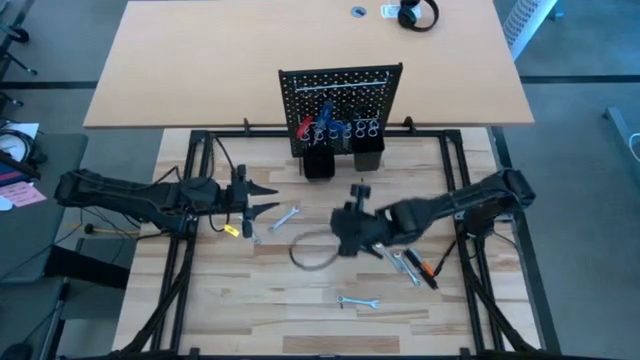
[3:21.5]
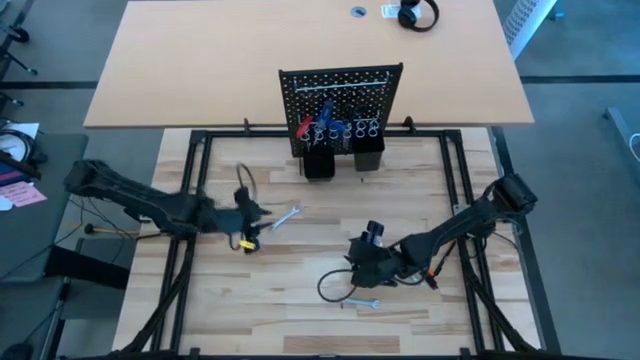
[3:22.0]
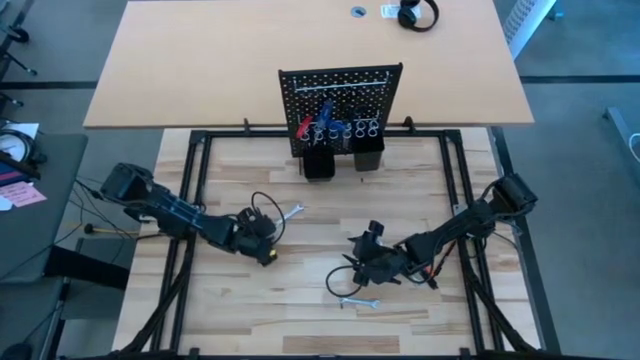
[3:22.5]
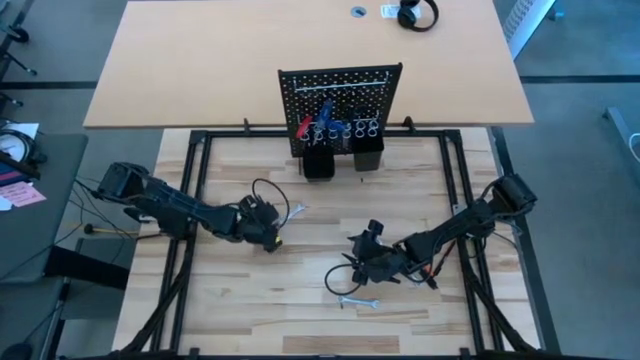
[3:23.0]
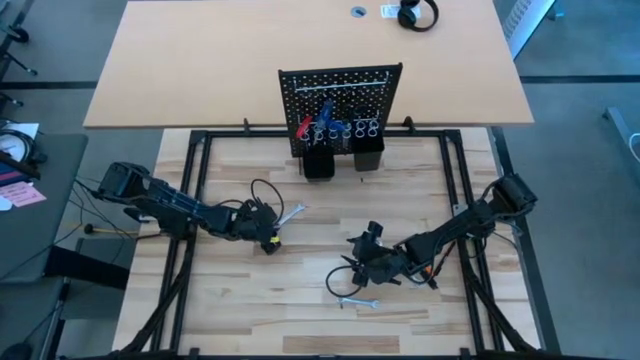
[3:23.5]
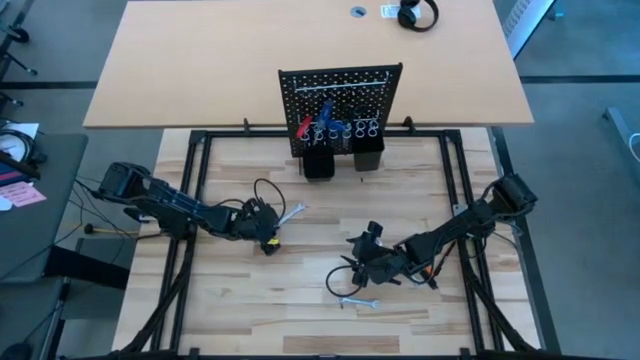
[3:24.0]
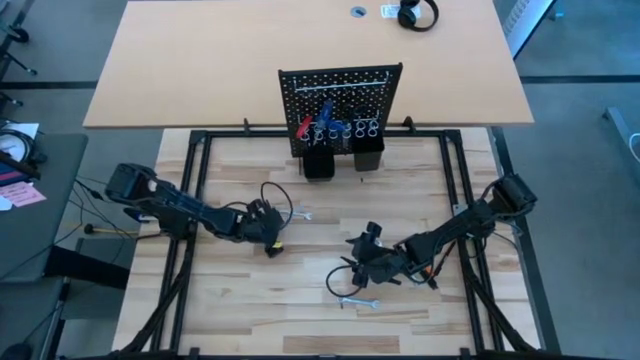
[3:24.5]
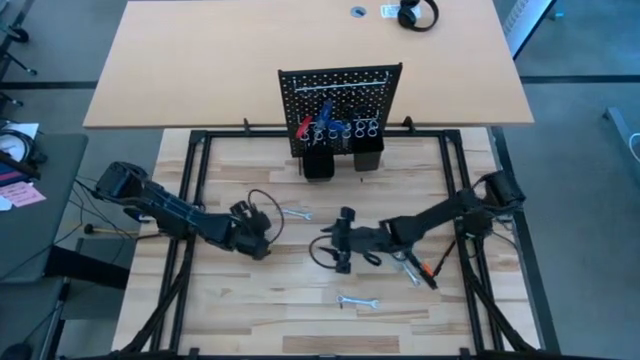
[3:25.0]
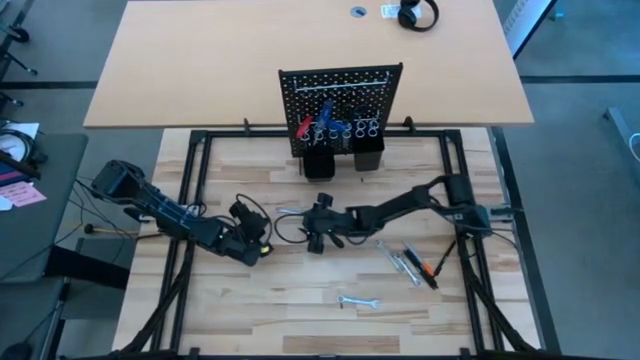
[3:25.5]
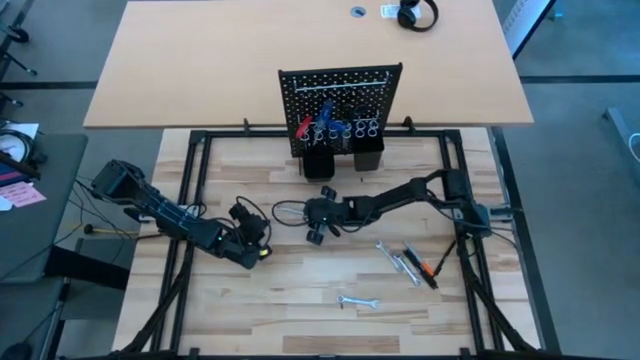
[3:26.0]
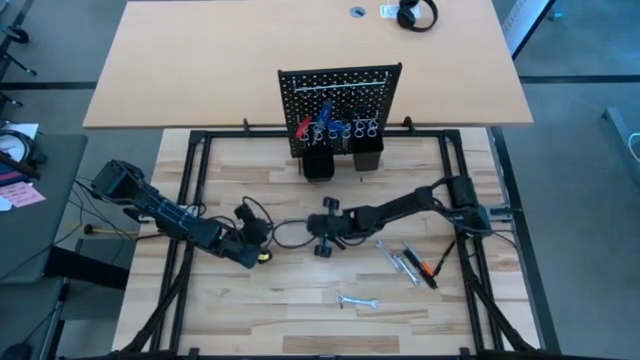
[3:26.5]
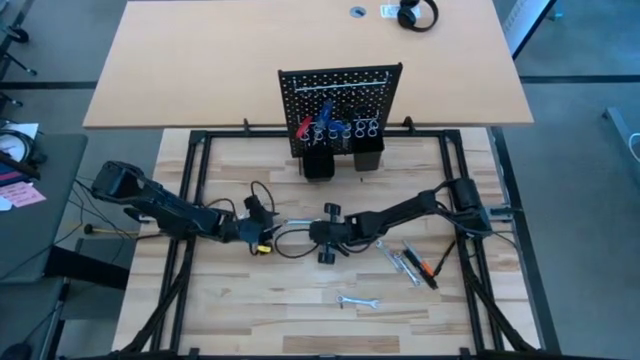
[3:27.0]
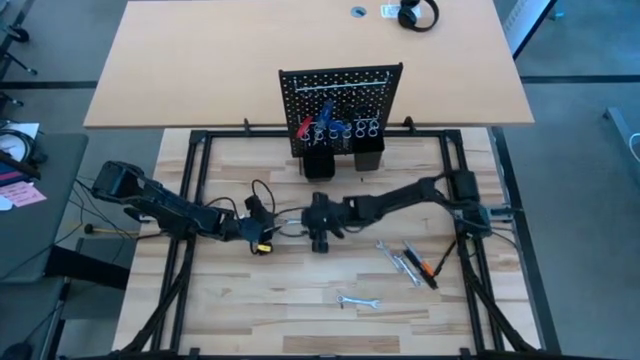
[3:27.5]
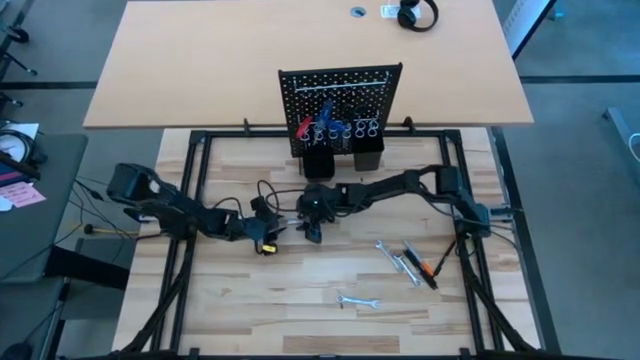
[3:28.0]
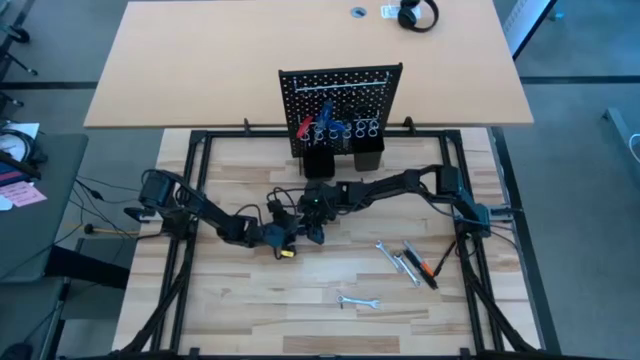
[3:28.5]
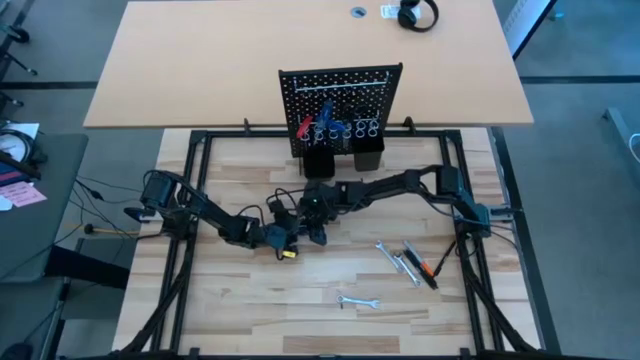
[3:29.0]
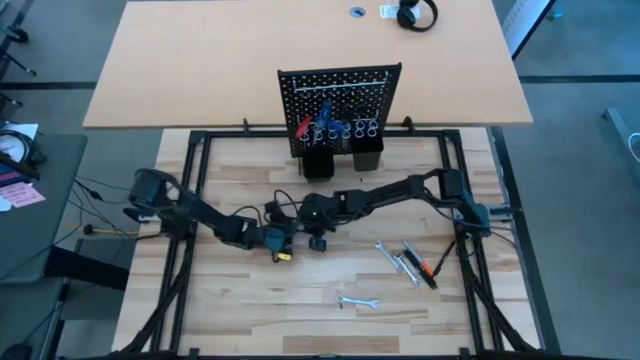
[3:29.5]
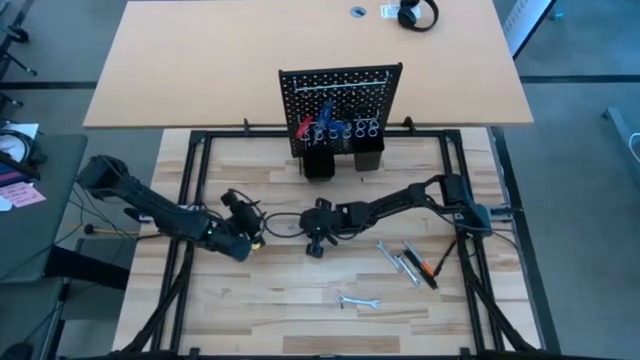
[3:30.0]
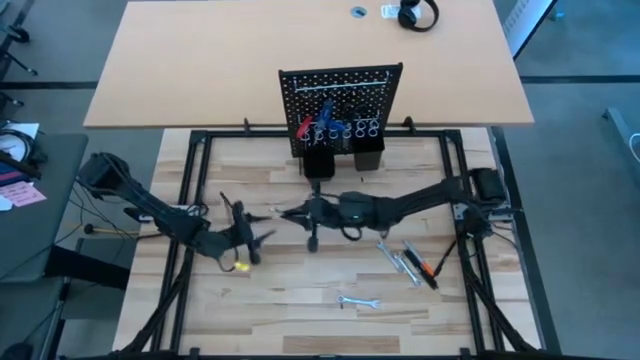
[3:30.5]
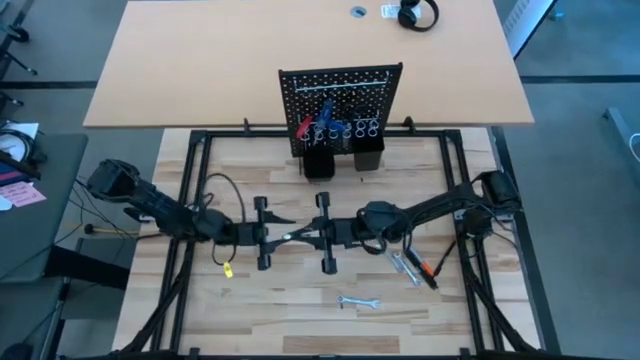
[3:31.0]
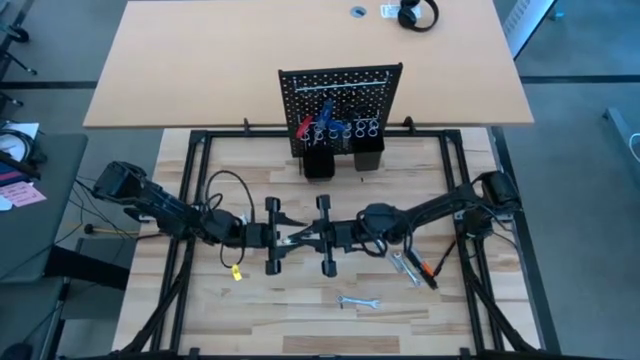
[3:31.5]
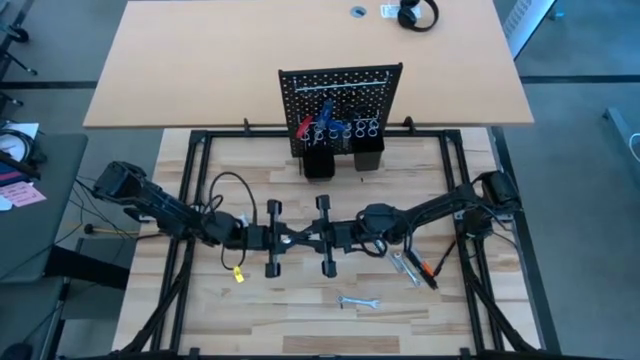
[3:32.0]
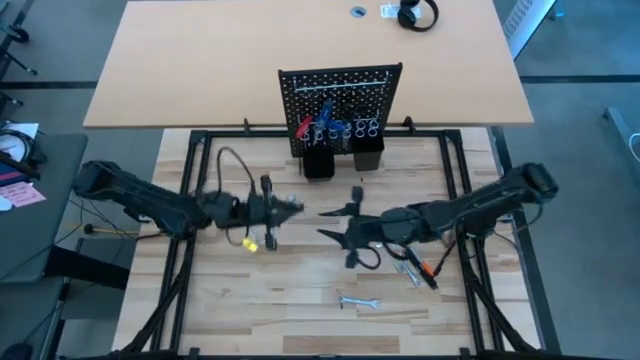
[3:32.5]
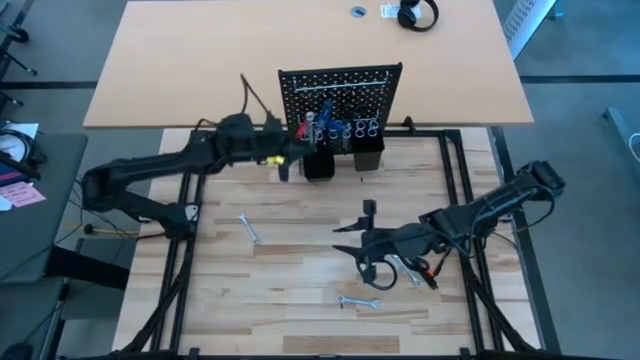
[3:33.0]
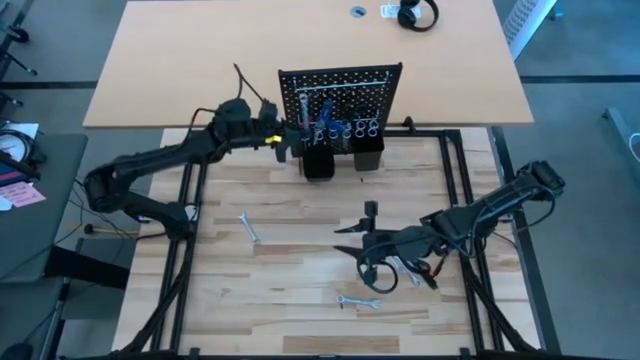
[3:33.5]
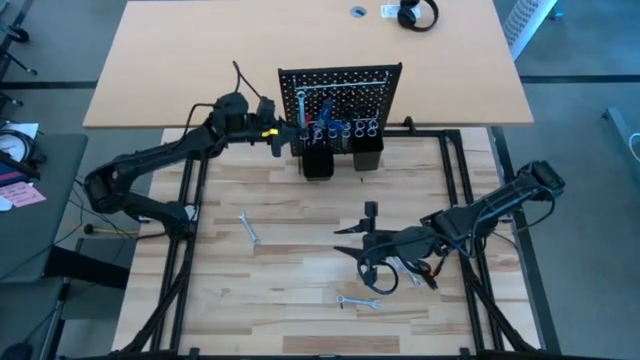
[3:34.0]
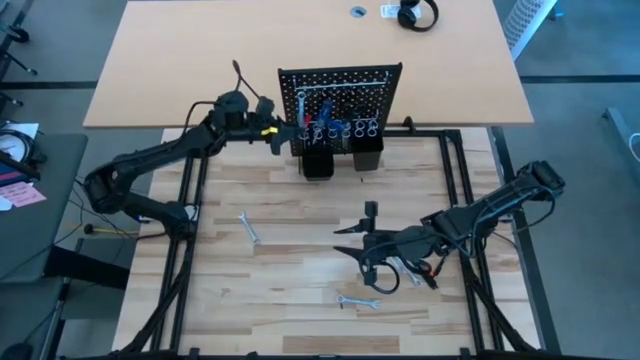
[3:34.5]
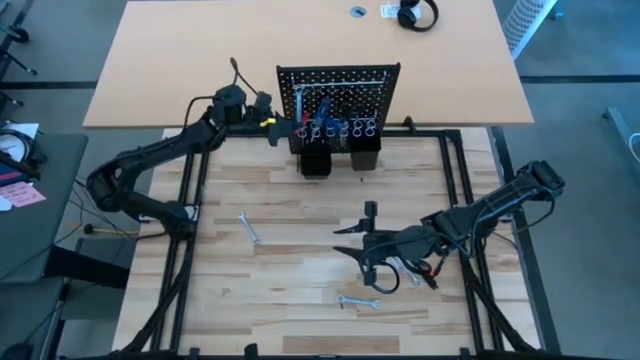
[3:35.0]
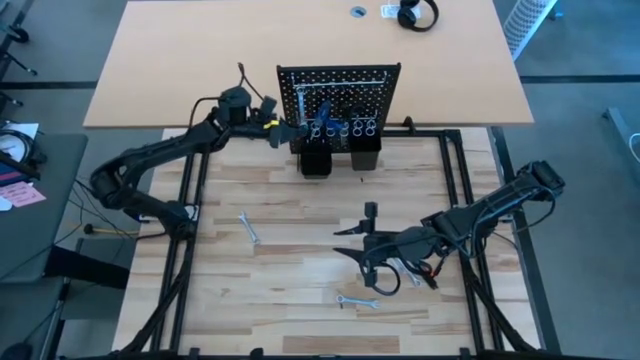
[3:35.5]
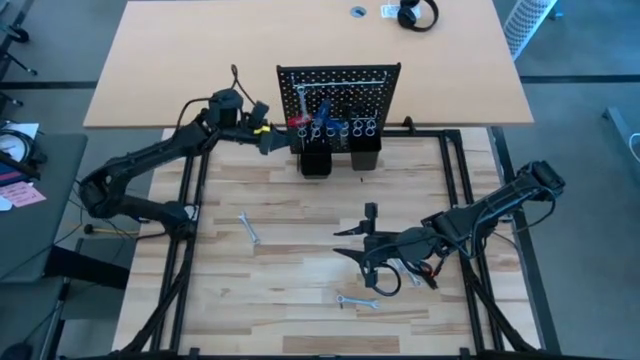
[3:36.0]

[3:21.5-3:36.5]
Task: Hang tools onto peg board
Hang the wrench on the pegboard
